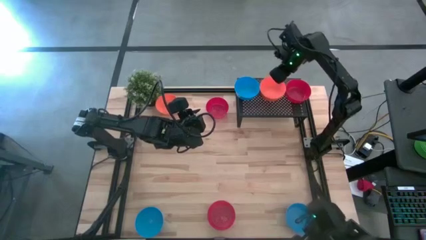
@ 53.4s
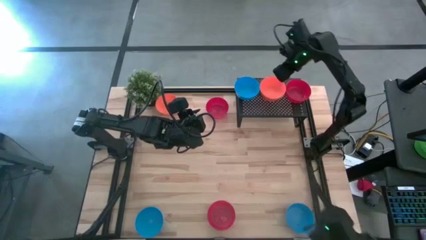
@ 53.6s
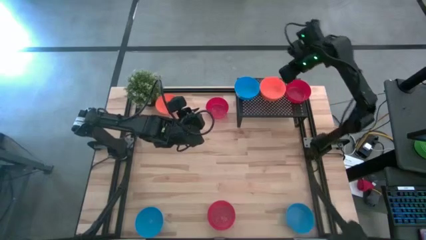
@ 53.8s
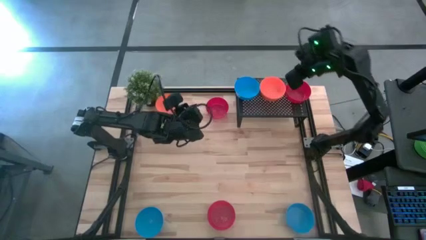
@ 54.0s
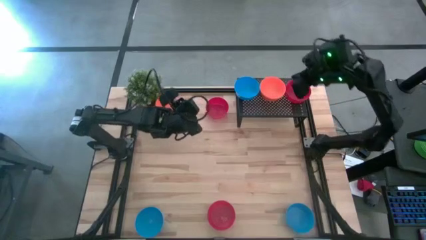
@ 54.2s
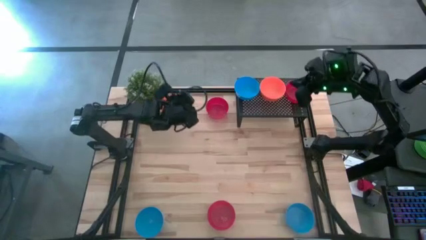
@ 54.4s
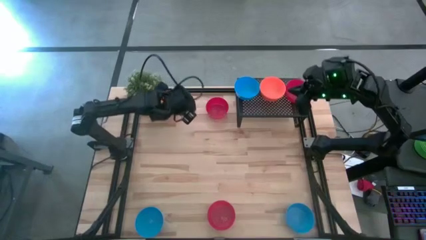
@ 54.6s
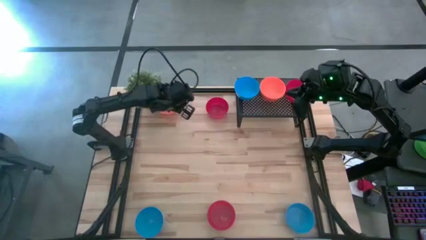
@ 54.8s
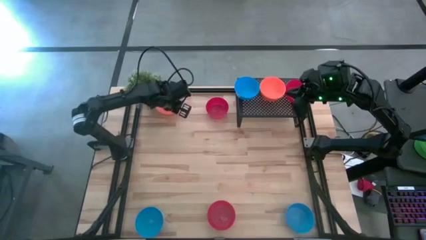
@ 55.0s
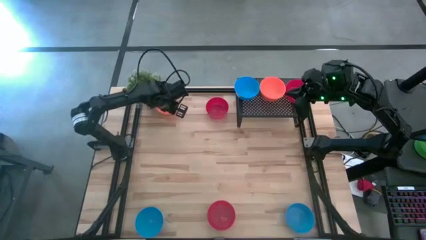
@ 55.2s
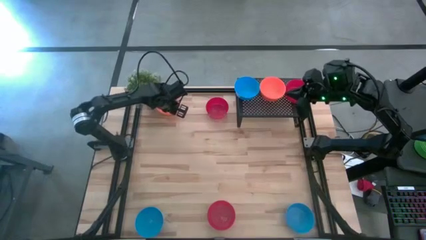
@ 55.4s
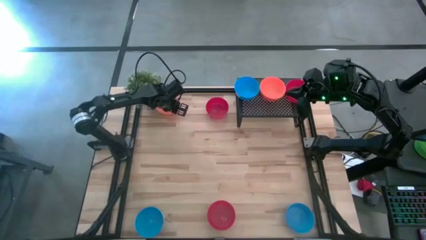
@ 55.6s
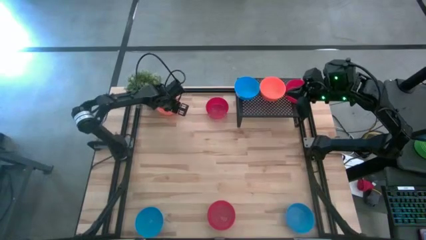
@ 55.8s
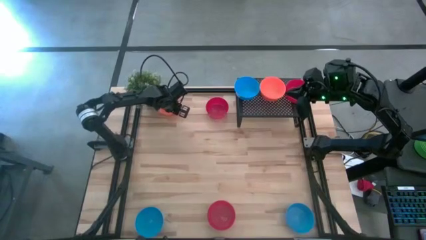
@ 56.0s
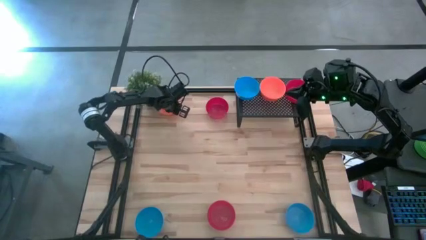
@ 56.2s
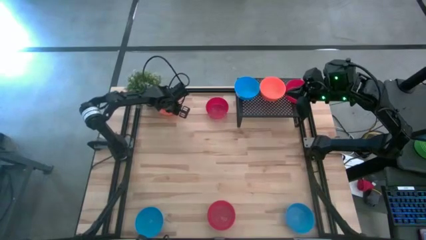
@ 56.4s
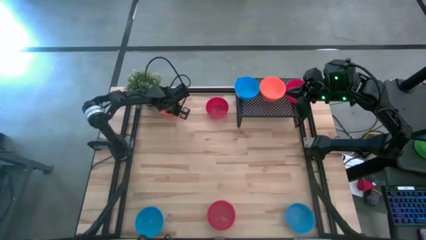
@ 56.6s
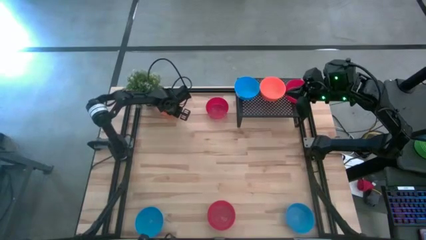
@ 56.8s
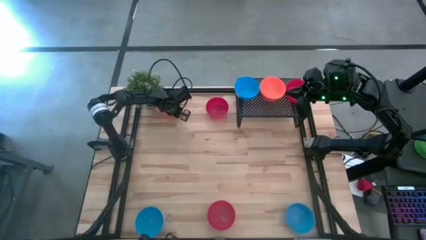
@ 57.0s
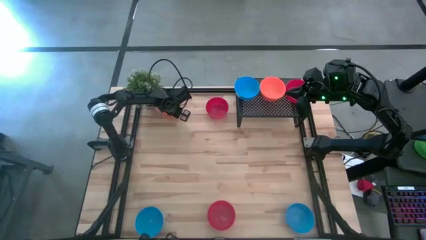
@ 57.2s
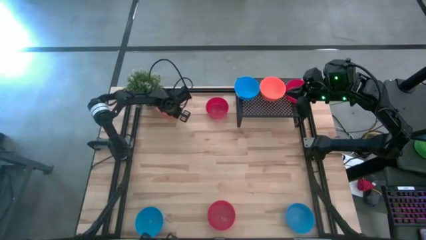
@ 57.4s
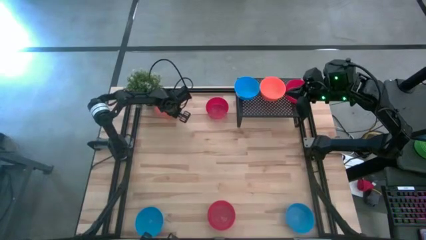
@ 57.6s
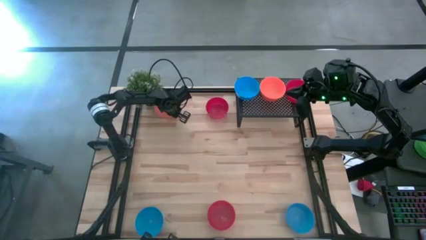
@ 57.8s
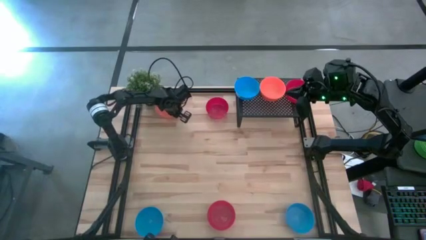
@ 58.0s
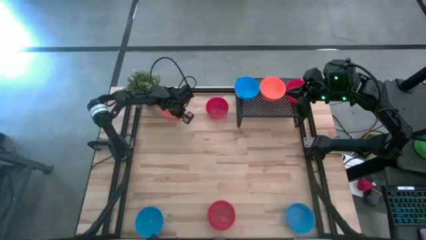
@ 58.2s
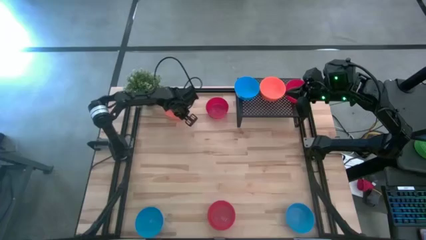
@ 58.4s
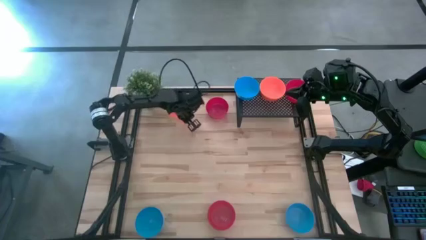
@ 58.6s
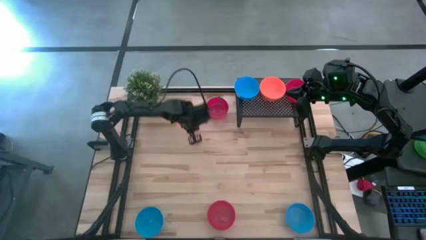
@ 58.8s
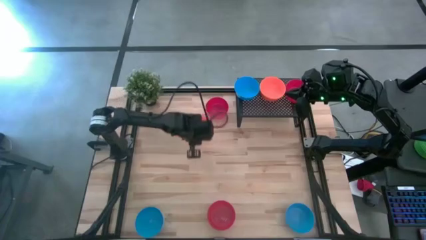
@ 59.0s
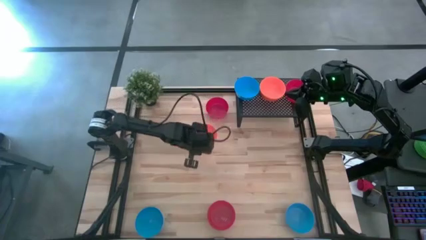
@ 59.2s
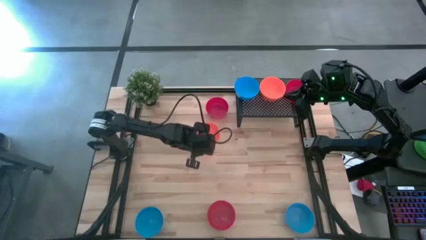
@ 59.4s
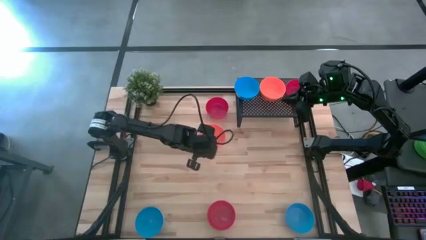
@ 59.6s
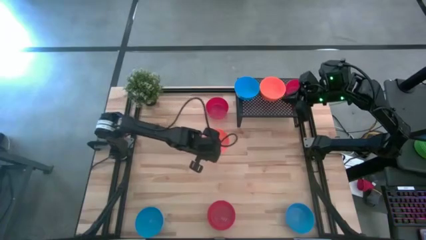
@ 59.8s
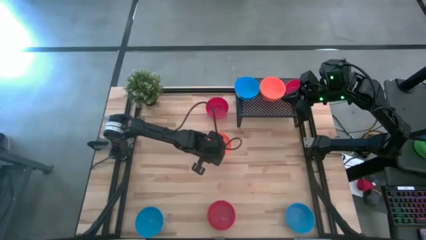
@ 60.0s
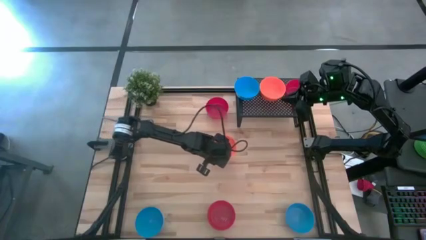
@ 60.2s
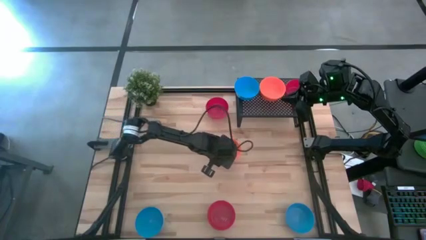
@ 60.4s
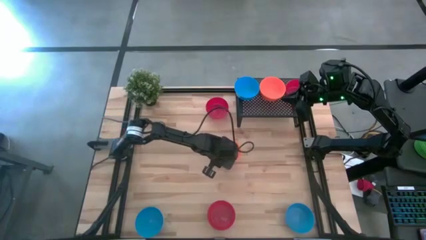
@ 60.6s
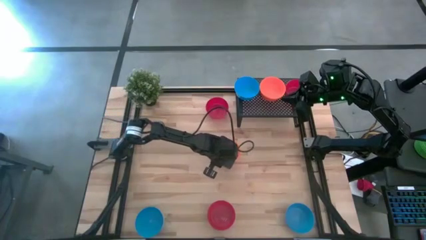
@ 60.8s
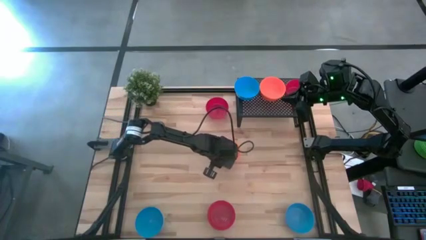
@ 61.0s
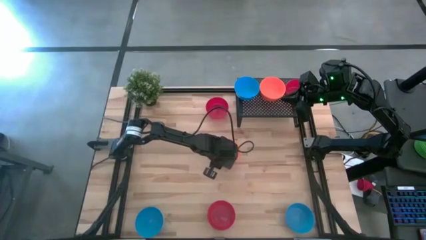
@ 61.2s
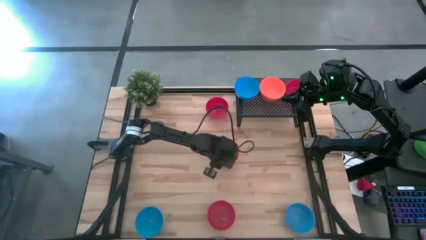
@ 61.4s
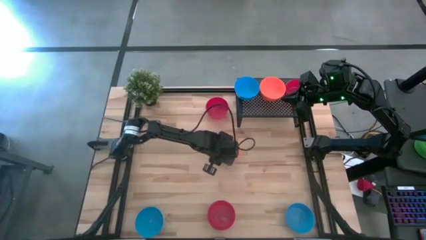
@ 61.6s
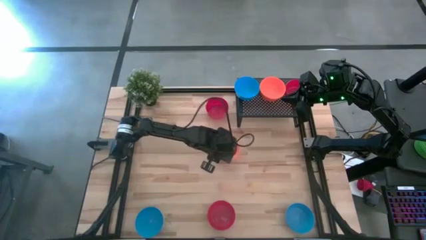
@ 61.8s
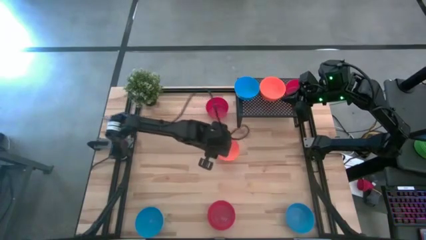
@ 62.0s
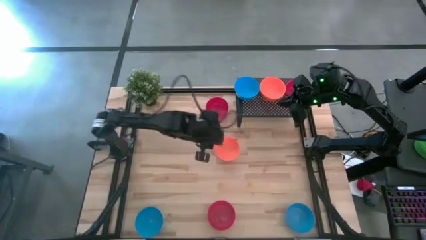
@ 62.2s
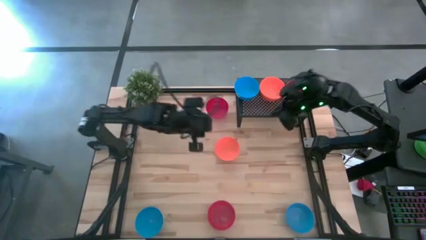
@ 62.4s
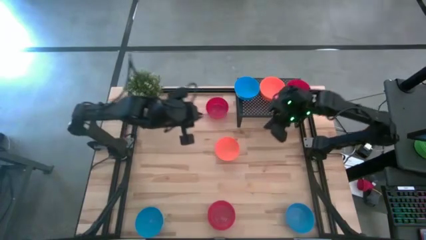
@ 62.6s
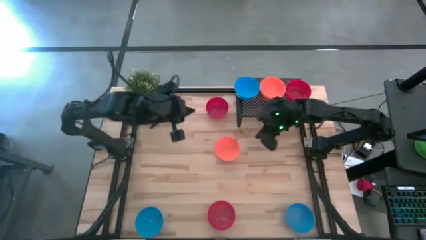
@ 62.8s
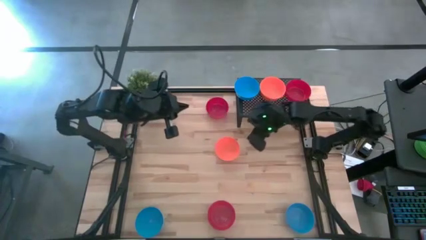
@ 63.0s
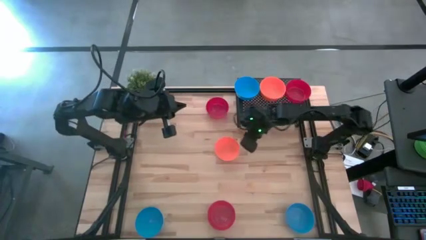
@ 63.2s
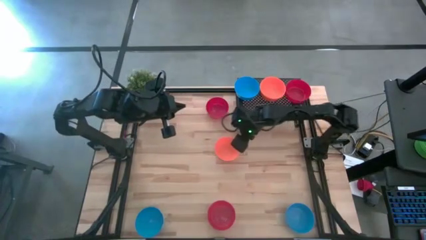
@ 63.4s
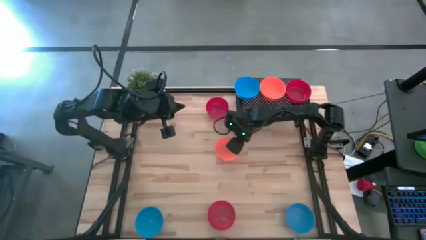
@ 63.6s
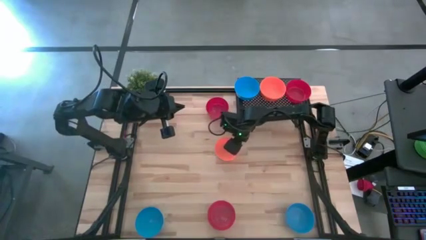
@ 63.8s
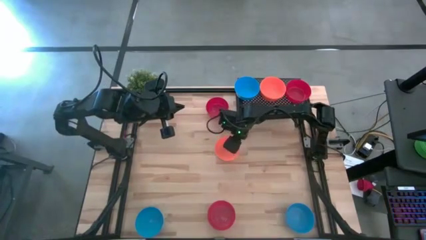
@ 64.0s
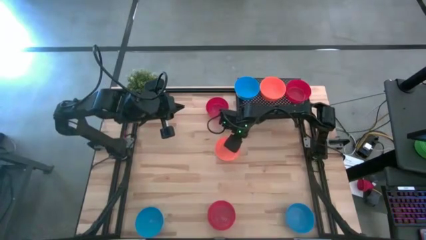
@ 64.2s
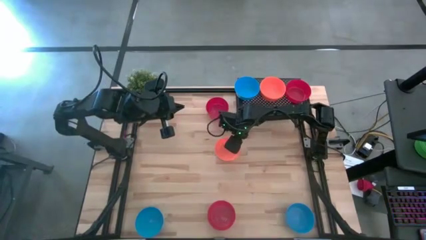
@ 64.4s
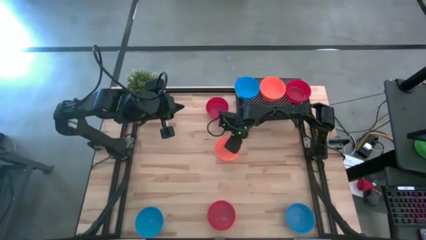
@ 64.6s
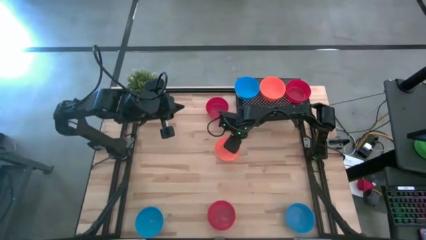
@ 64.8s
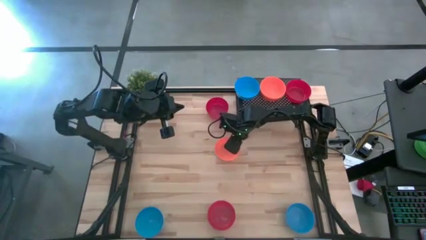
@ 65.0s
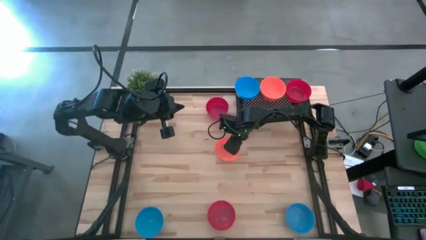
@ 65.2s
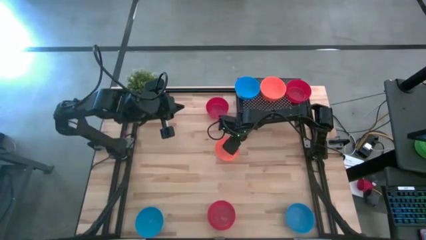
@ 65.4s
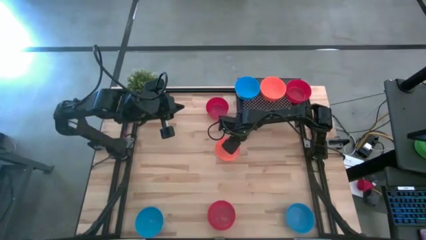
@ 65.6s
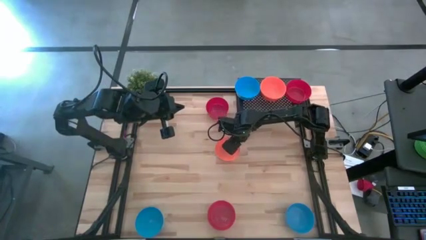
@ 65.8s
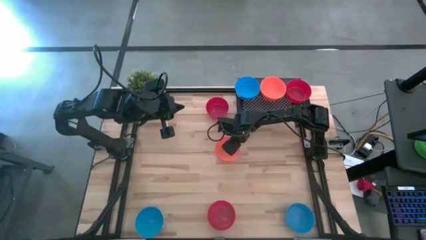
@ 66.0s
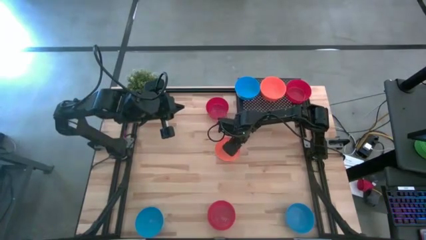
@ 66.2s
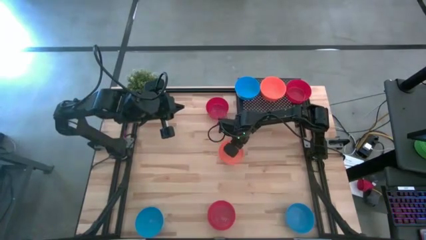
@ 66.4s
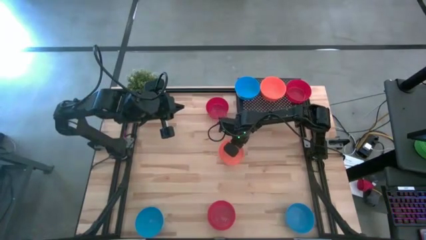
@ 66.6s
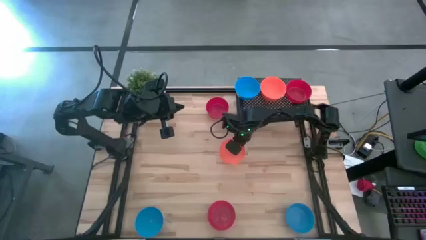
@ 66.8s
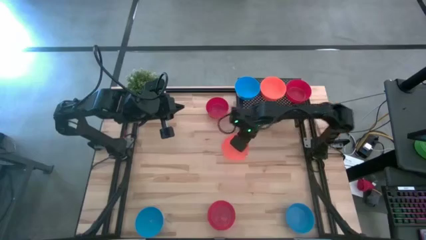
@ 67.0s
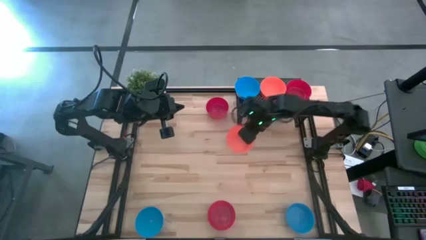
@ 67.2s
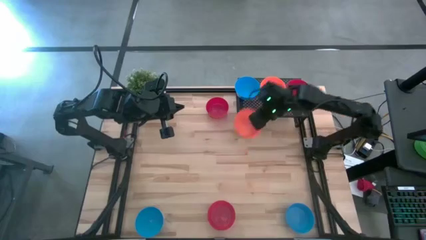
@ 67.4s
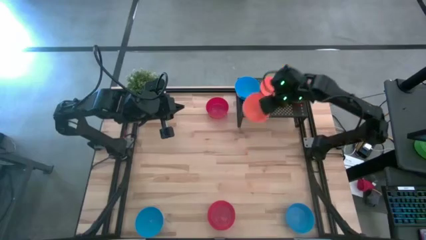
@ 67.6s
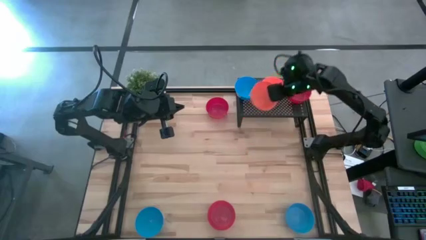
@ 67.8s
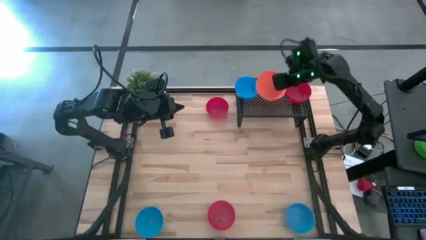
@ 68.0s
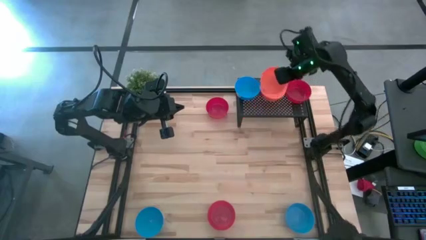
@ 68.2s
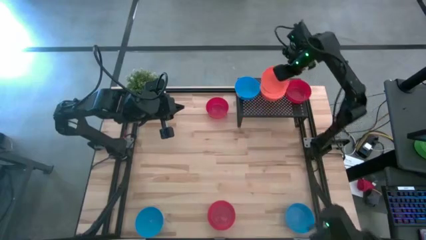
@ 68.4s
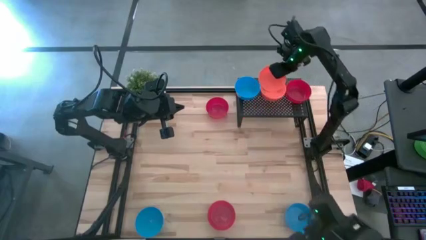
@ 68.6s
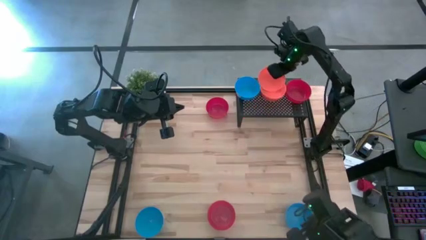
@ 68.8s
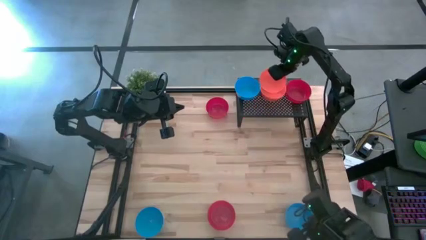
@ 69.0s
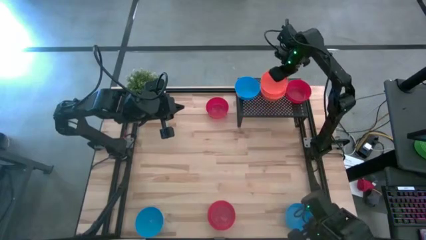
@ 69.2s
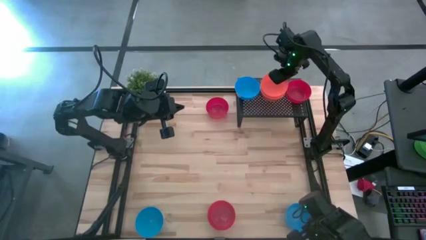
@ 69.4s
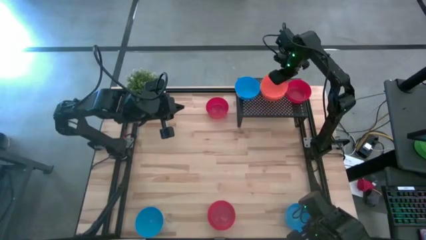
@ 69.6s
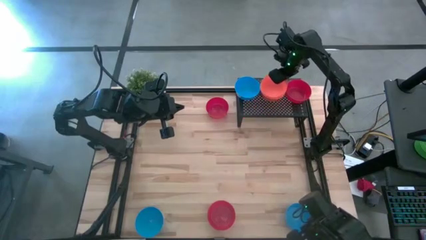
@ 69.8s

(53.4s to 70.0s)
Task: Pick & Place Mini bowls
Stack the orange bowl on the orange bowl
